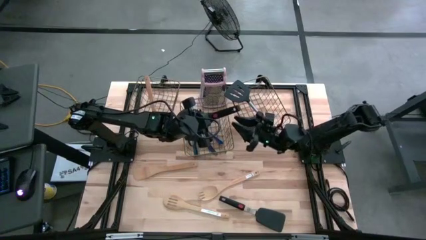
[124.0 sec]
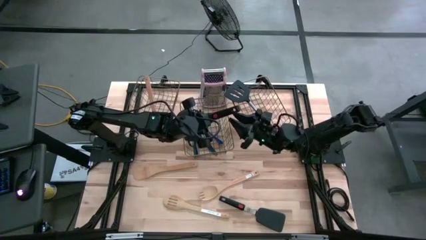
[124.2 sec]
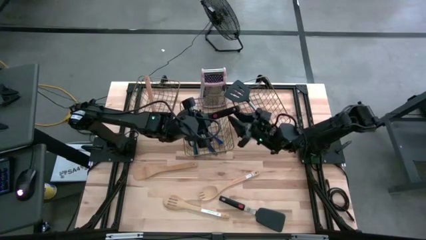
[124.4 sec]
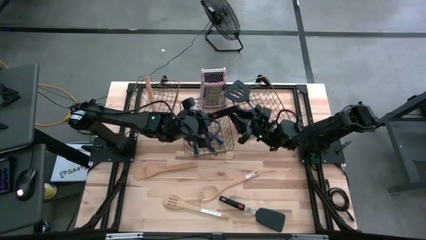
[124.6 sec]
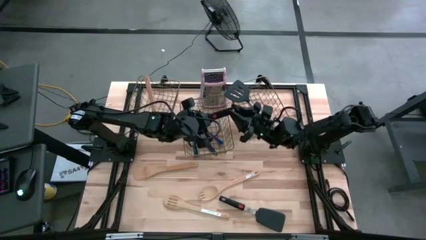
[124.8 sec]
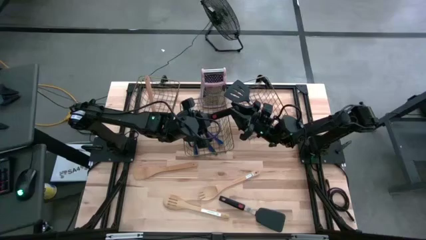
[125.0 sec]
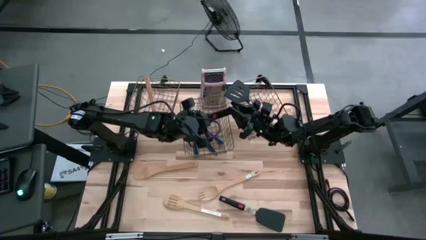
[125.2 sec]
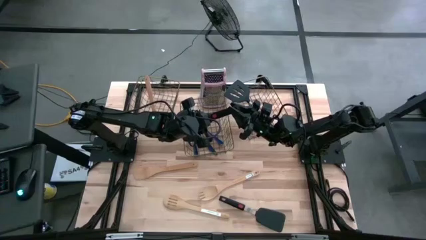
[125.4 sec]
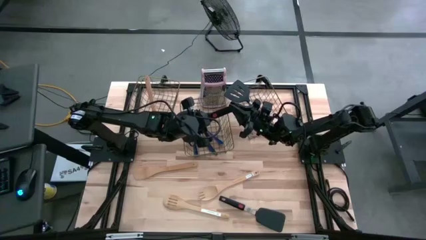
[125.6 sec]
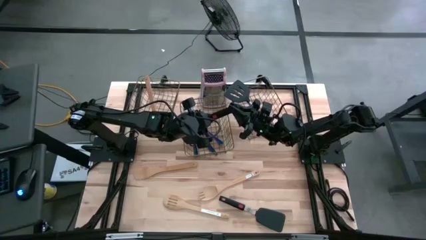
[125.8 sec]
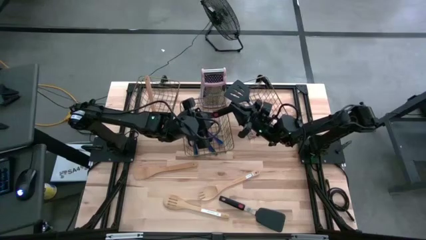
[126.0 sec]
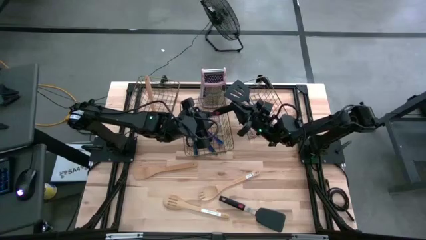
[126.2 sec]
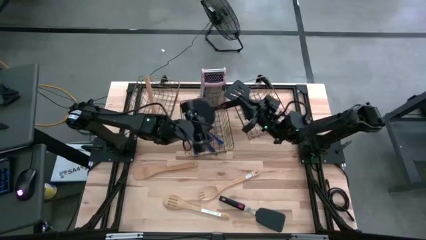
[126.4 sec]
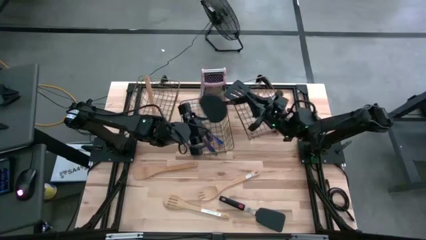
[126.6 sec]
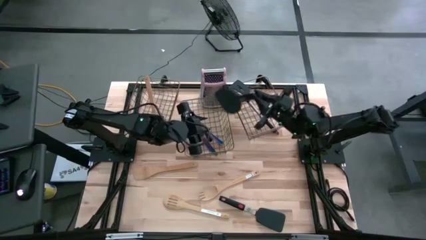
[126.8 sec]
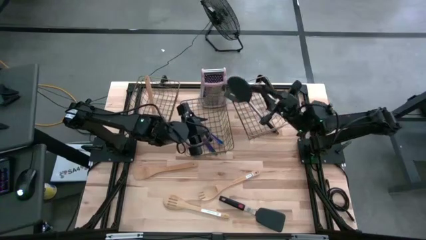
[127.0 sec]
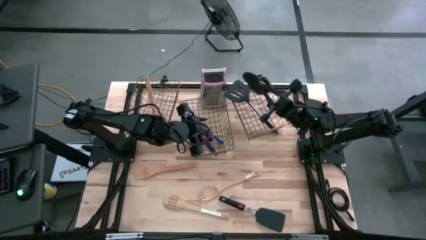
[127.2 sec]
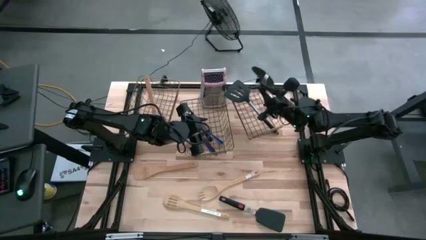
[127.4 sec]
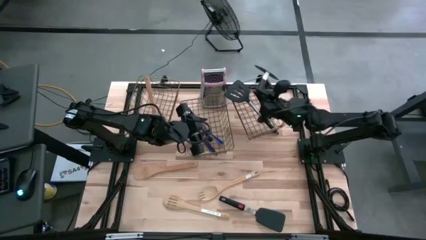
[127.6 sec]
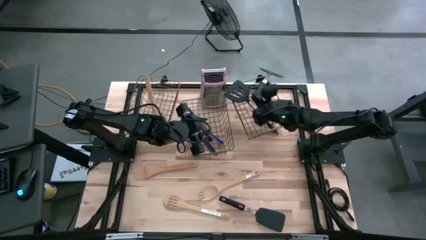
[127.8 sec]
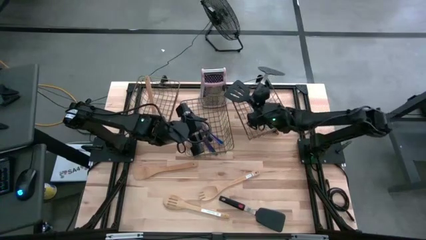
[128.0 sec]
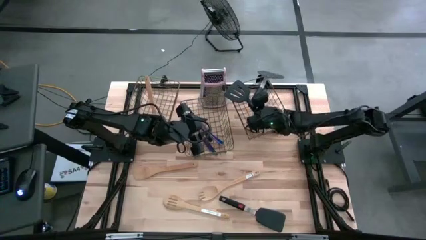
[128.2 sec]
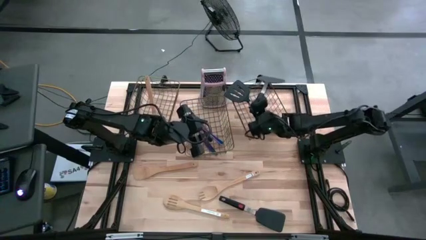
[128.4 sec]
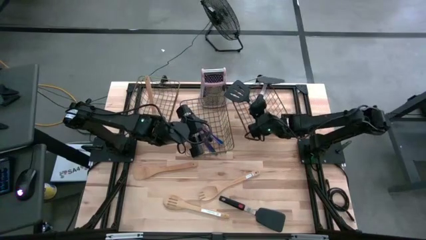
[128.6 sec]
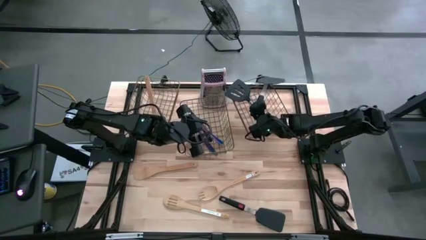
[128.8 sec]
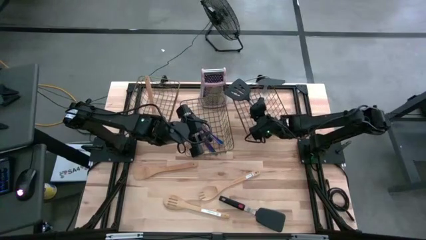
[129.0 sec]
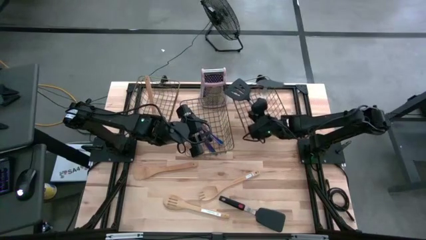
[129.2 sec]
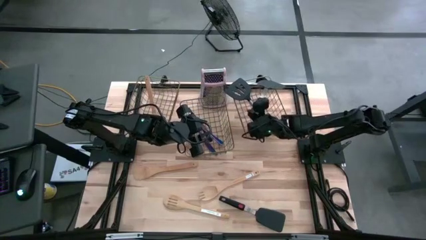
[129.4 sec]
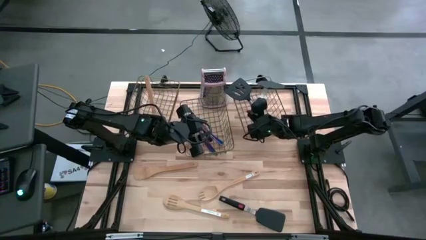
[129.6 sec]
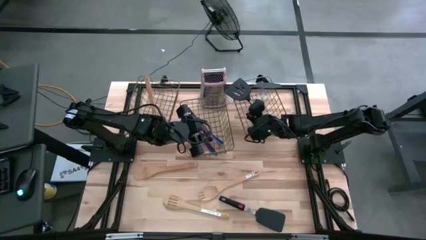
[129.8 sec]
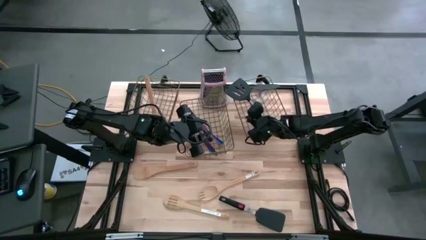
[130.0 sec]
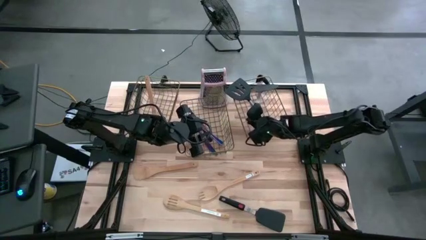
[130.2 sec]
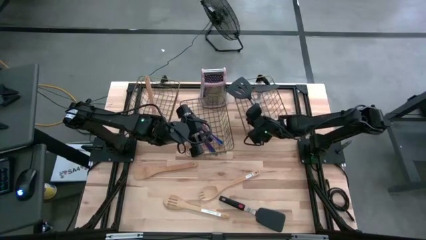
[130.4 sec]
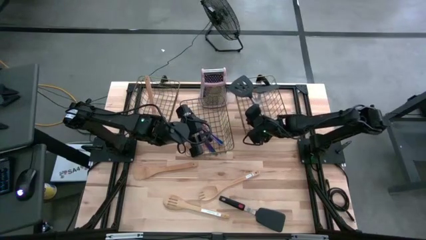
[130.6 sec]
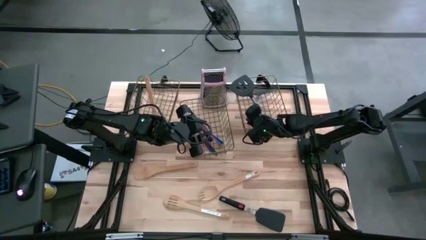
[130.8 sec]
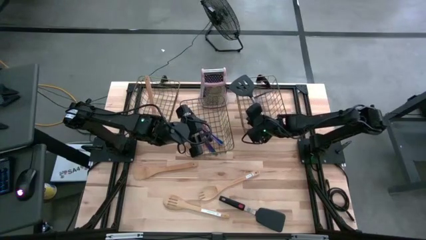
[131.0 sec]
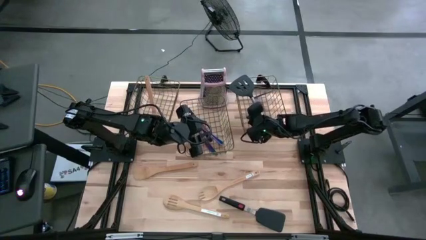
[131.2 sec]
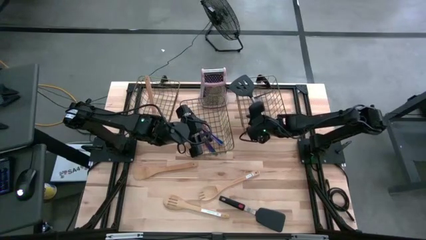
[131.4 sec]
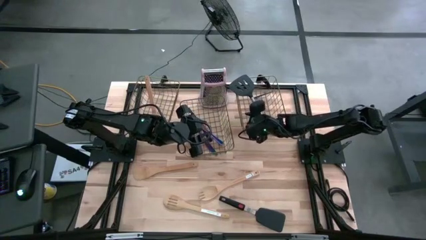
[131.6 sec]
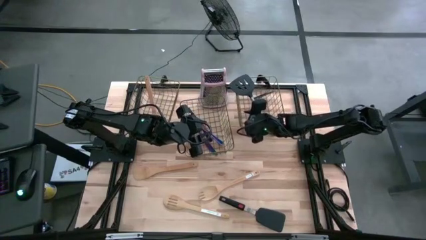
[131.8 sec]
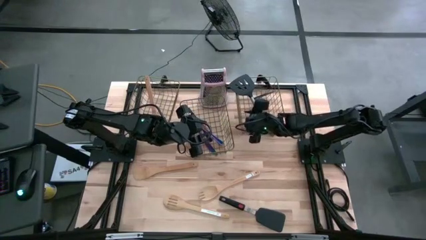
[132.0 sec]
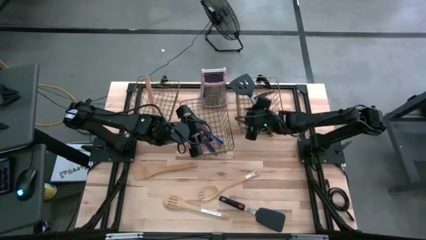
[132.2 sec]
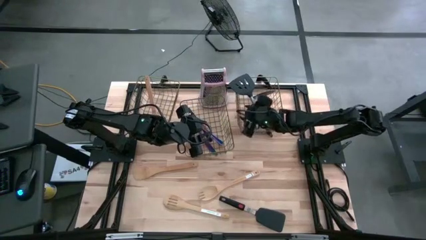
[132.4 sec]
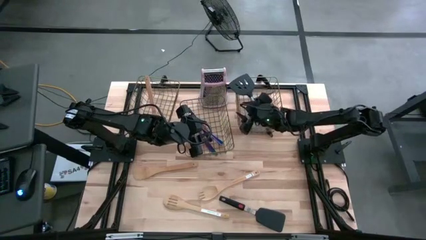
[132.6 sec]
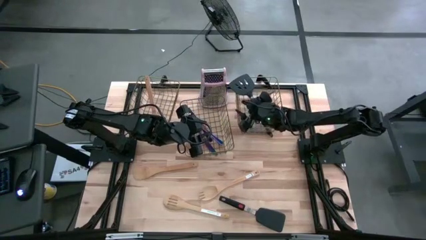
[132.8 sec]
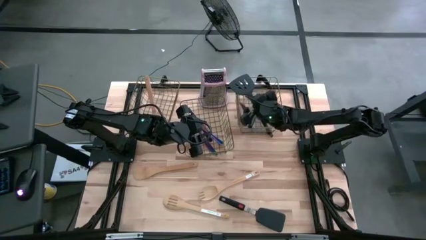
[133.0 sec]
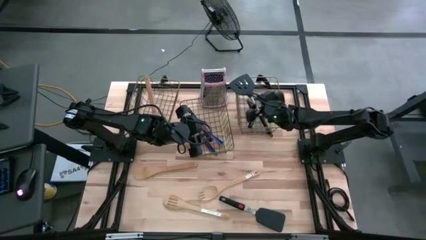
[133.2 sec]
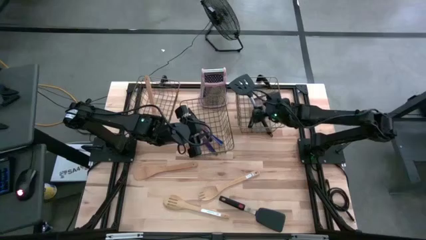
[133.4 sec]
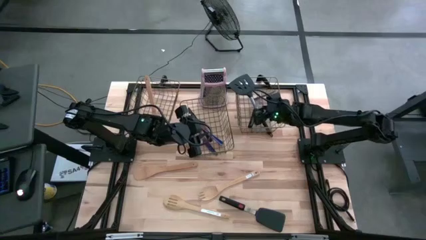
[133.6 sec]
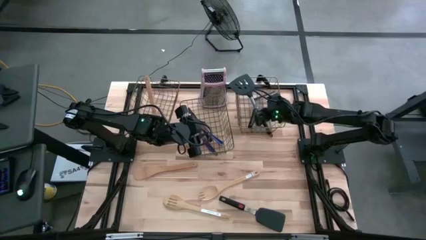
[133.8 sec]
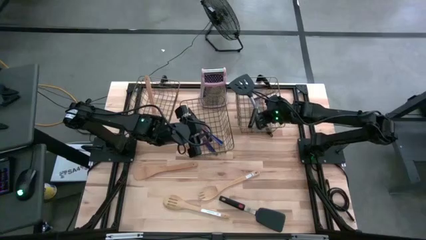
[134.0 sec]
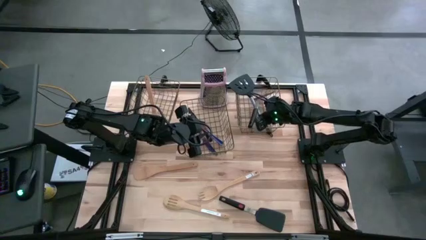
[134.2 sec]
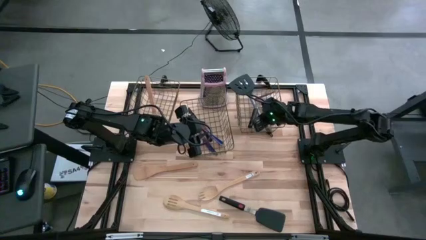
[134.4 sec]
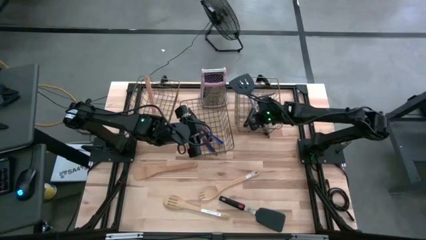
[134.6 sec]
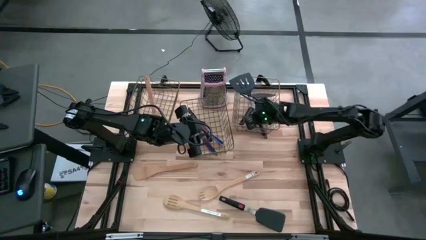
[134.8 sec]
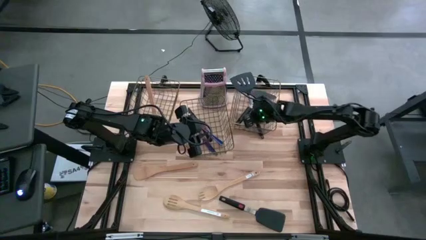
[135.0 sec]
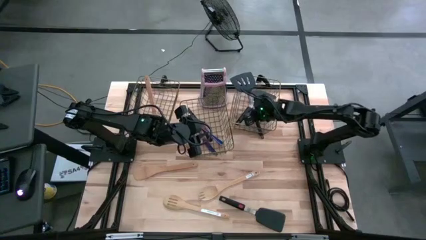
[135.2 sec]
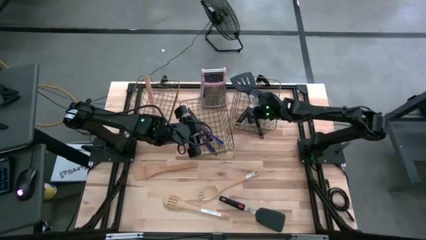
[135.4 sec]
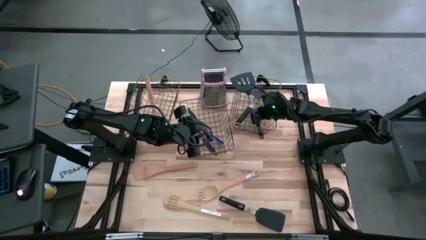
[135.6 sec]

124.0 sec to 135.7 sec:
Task: Pick & Place Kitchen Items
Put the left black spatula into the right wire basket

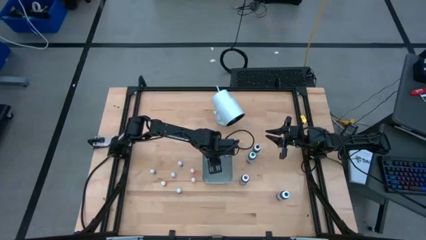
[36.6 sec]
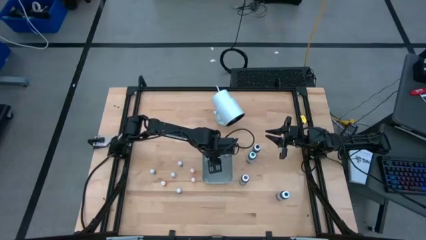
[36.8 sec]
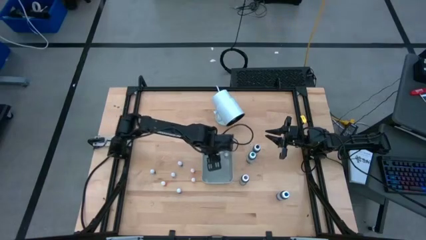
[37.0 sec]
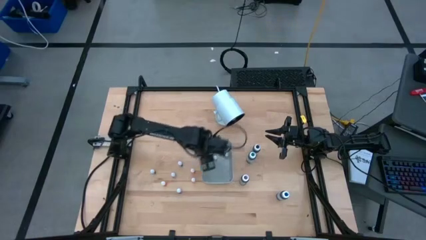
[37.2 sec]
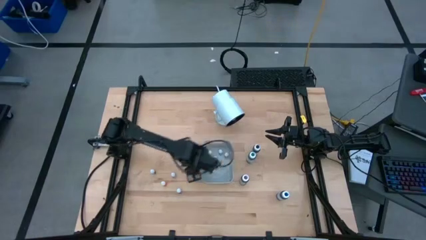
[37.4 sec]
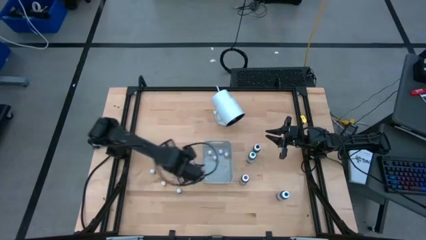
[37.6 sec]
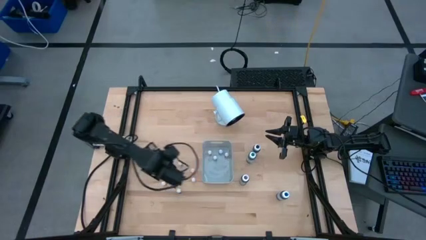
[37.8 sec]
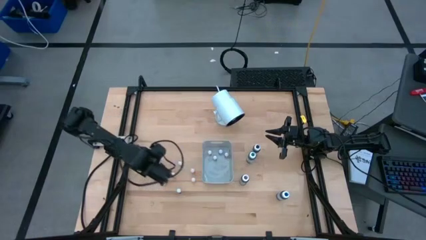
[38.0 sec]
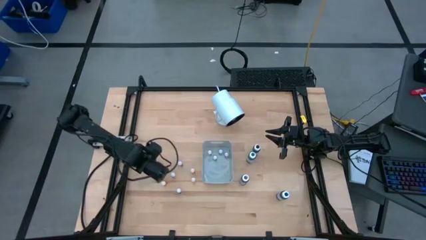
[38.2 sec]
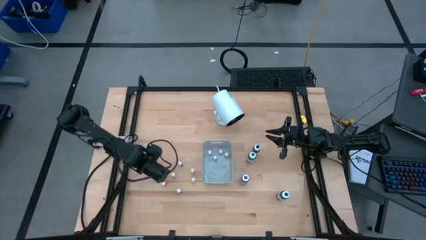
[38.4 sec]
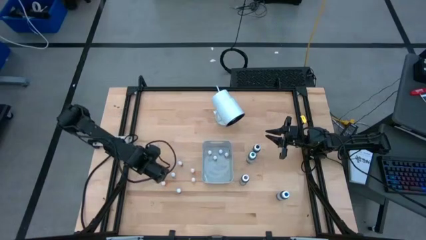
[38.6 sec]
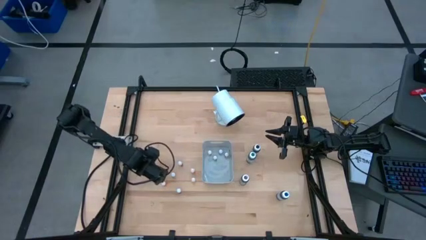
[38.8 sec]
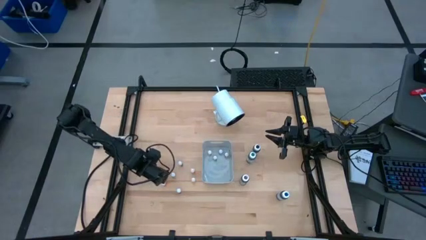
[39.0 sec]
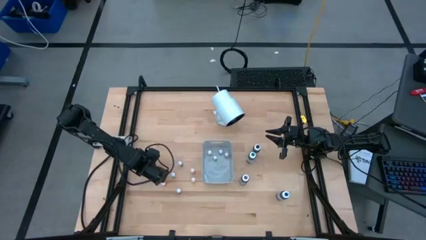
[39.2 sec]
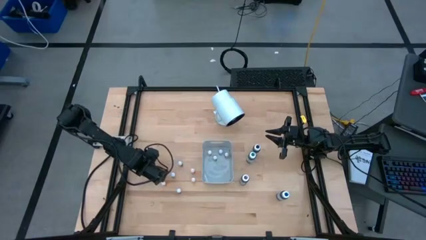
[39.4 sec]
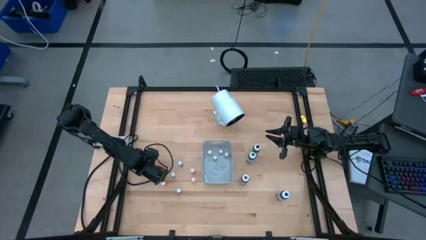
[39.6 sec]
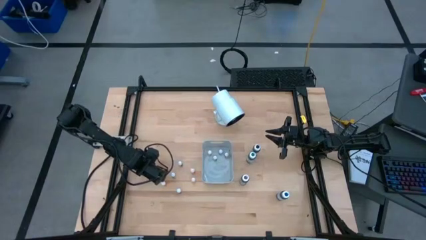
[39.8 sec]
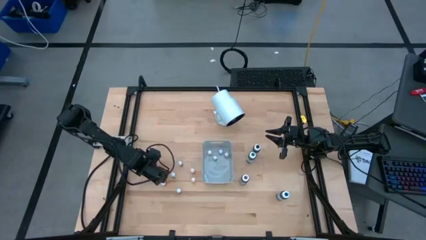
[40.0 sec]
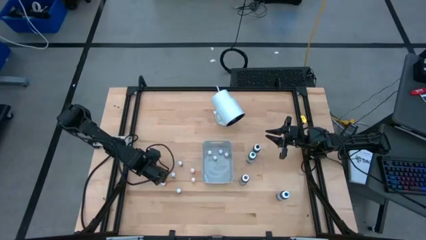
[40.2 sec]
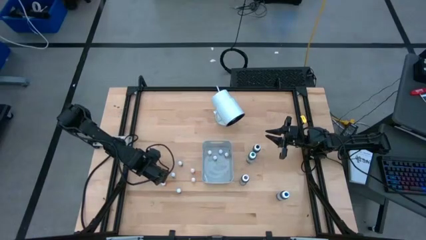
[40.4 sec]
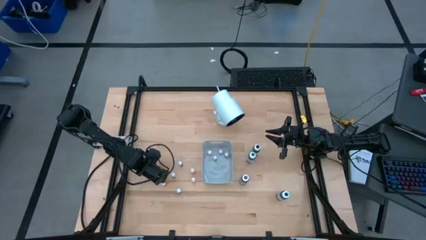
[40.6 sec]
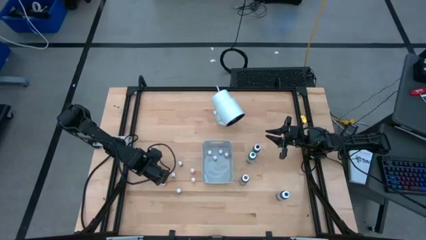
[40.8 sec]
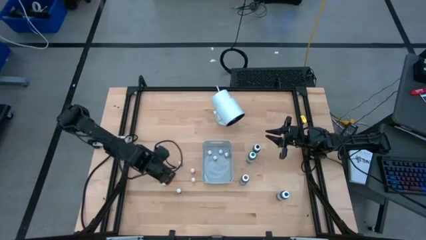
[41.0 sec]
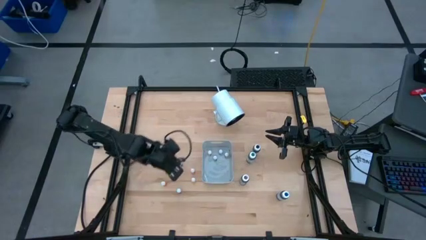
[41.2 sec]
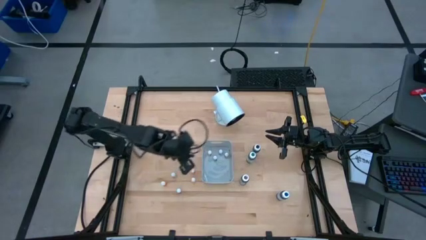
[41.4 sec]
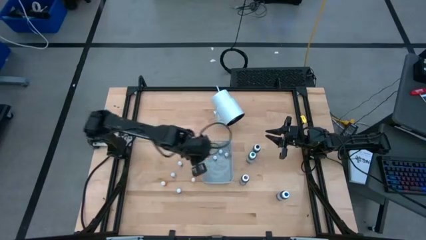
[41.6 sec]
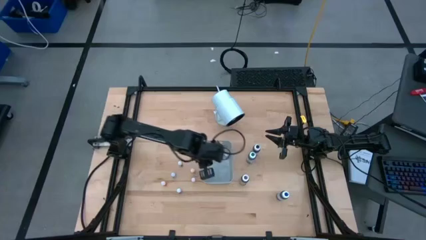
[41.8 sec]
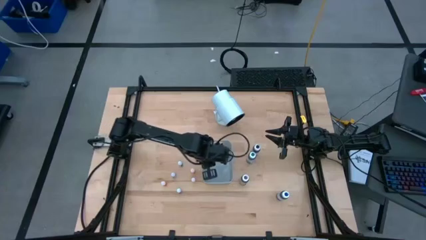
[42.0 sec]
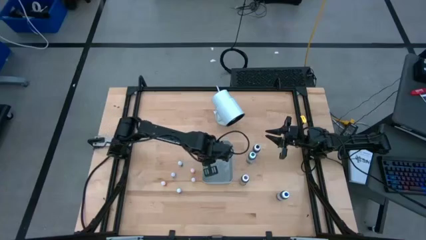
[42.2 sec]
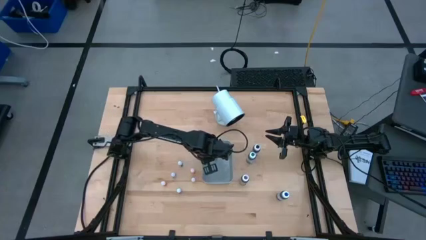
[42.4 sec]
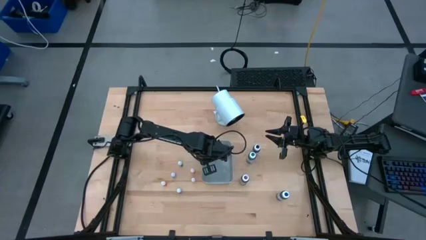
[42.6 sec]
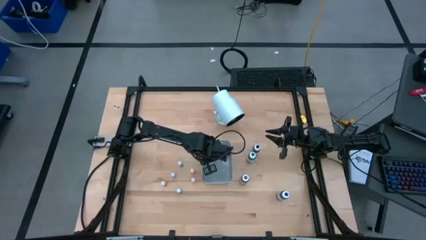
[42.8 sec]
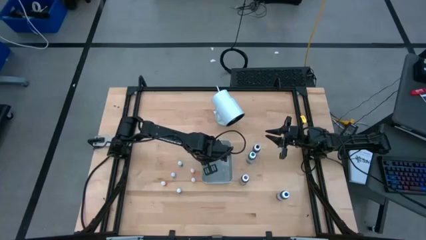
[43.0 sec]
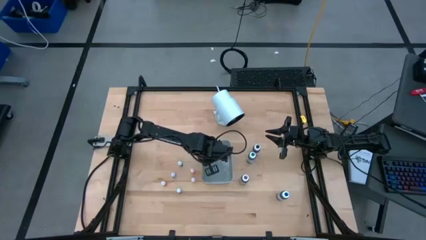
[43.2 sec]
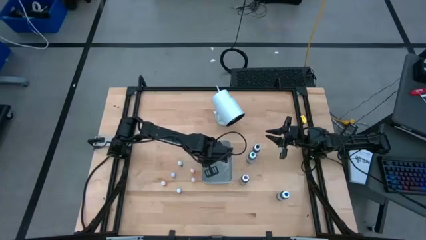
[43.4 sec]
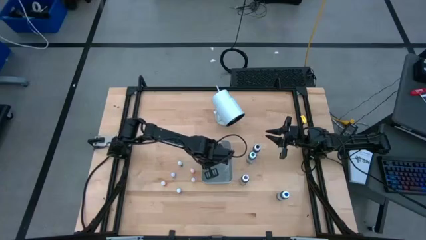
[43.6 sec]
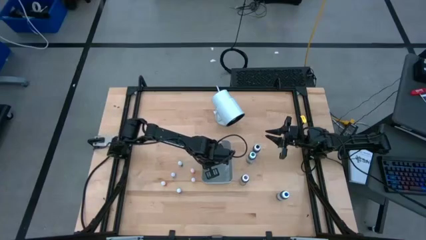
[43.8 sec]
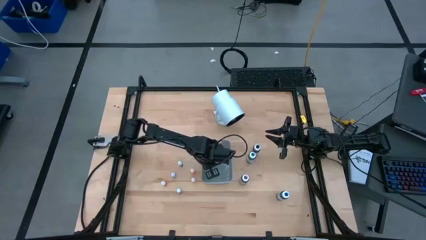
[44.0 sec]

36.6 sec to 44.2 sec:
Task: Pick & Place food coloring
Put the bottom small black food coloring bottle into the gray bin
